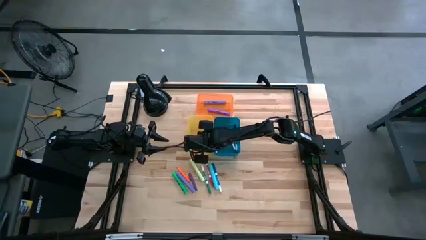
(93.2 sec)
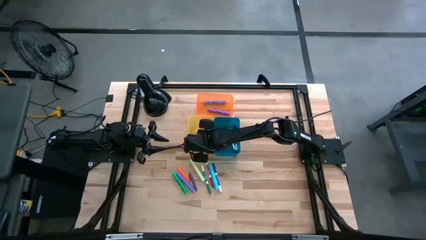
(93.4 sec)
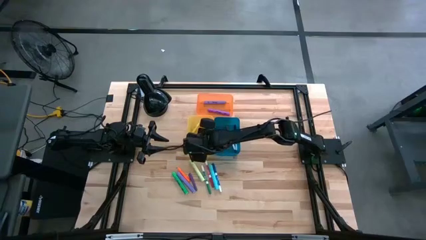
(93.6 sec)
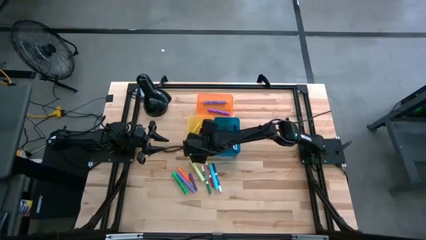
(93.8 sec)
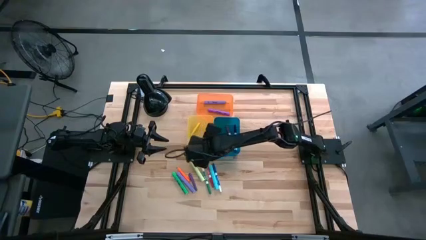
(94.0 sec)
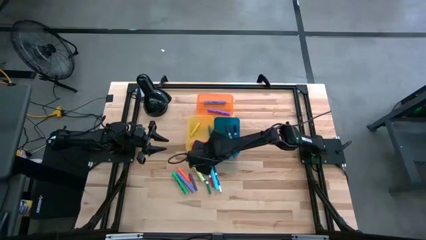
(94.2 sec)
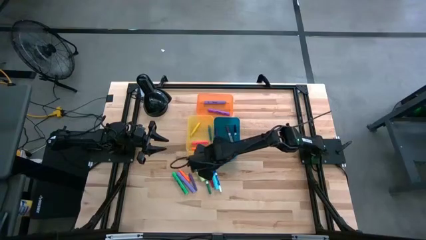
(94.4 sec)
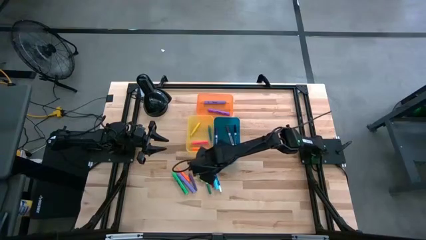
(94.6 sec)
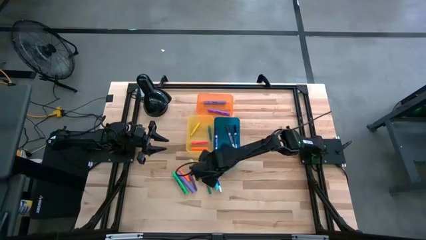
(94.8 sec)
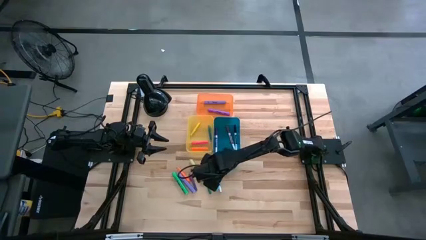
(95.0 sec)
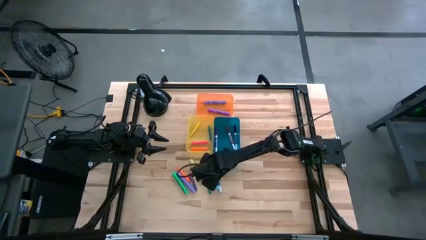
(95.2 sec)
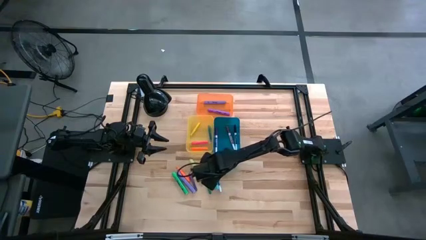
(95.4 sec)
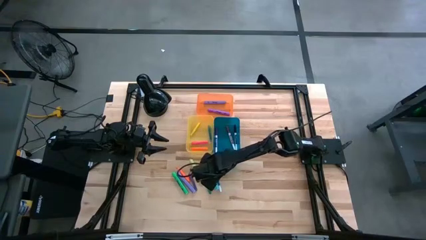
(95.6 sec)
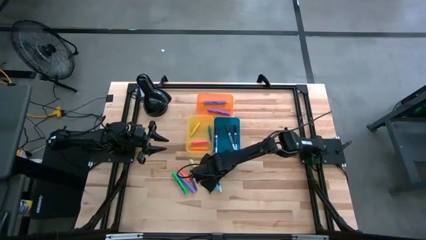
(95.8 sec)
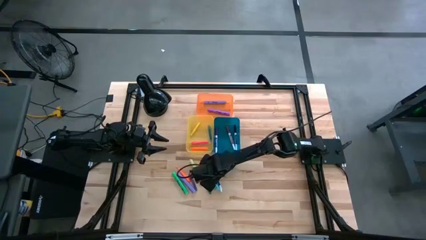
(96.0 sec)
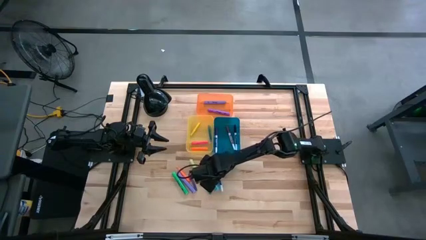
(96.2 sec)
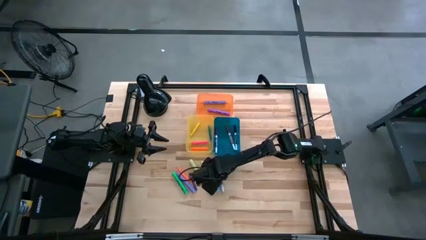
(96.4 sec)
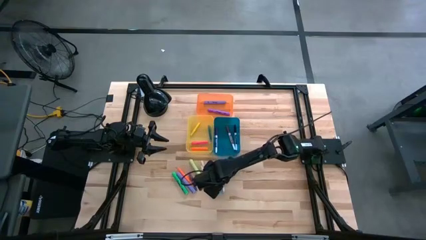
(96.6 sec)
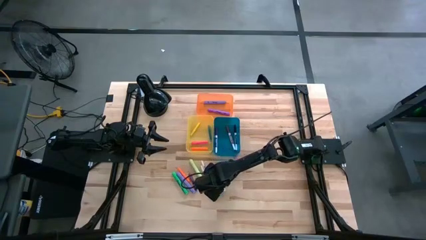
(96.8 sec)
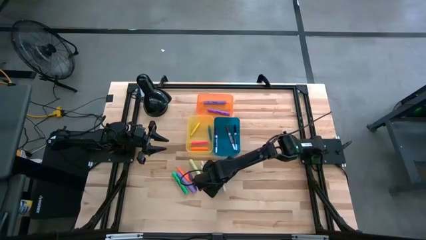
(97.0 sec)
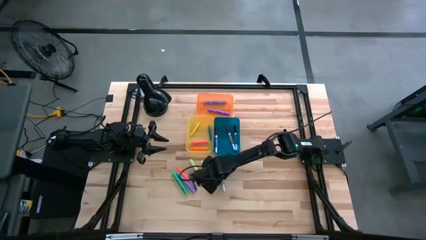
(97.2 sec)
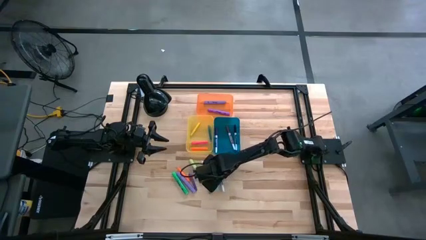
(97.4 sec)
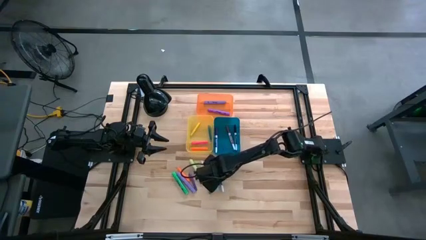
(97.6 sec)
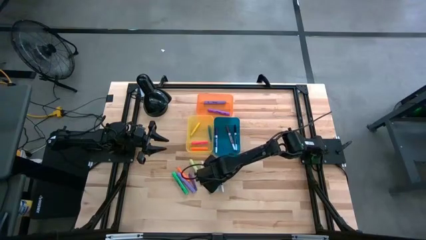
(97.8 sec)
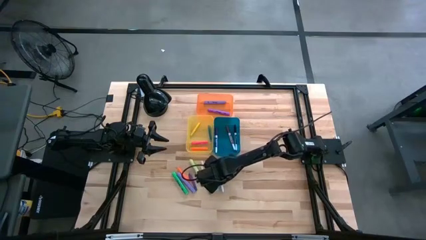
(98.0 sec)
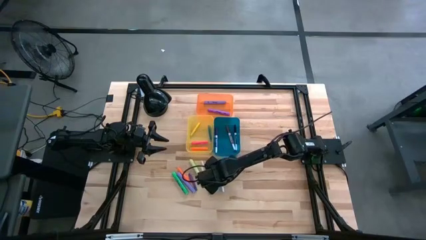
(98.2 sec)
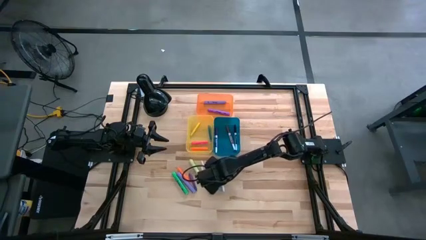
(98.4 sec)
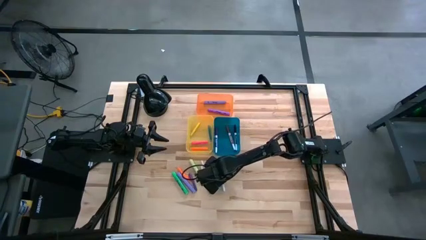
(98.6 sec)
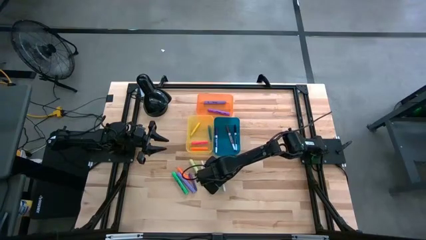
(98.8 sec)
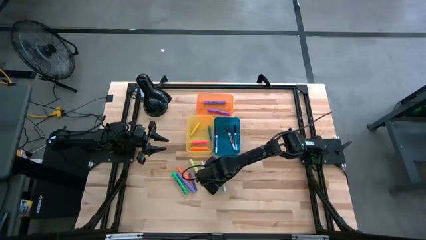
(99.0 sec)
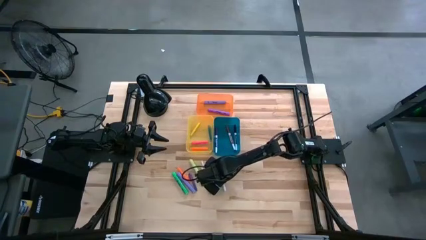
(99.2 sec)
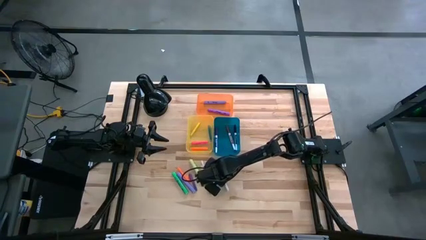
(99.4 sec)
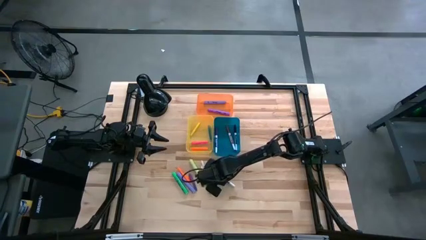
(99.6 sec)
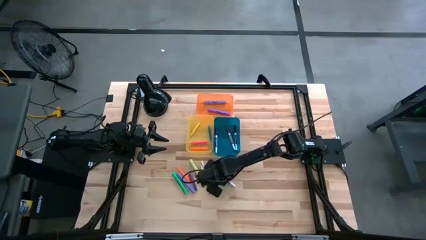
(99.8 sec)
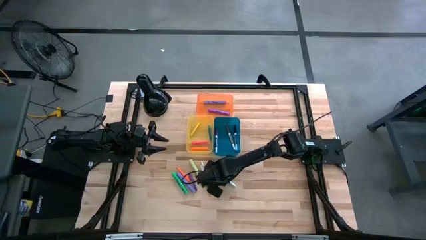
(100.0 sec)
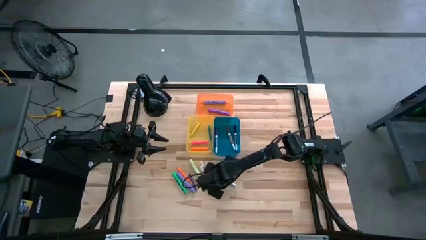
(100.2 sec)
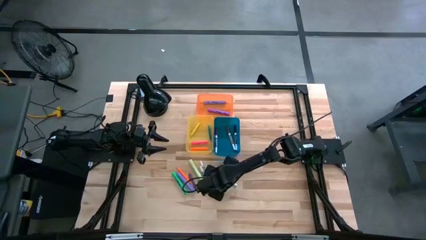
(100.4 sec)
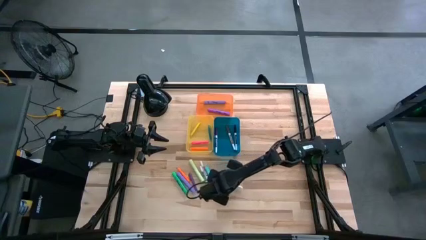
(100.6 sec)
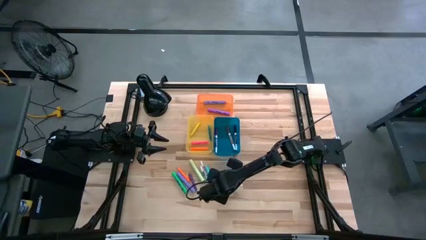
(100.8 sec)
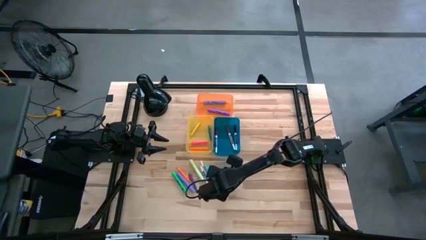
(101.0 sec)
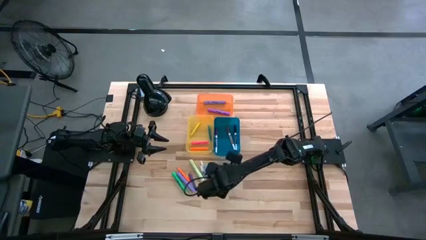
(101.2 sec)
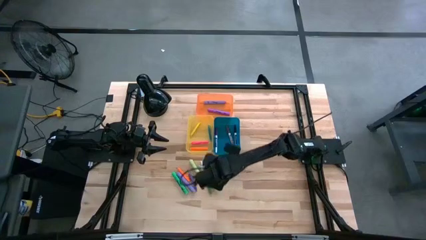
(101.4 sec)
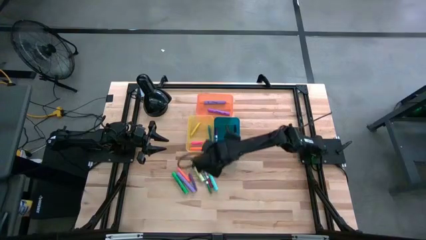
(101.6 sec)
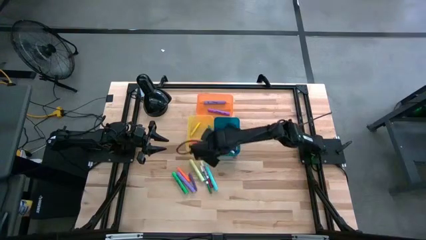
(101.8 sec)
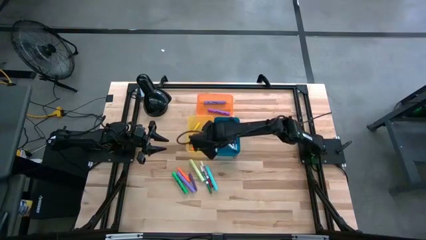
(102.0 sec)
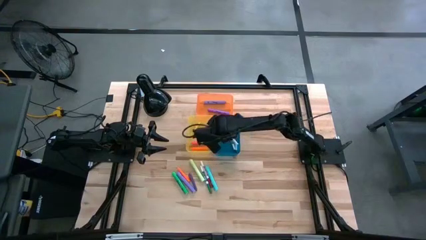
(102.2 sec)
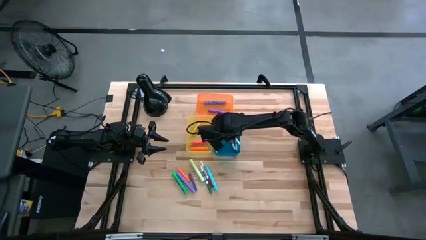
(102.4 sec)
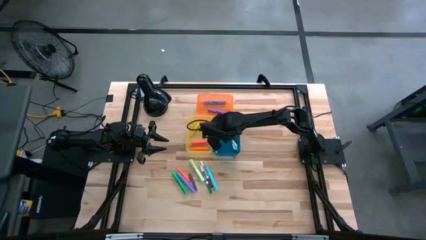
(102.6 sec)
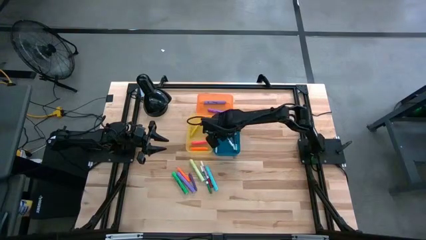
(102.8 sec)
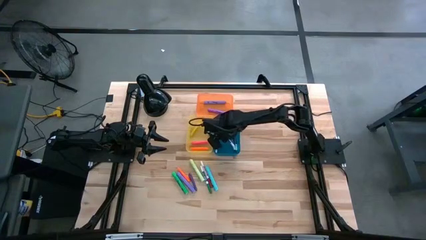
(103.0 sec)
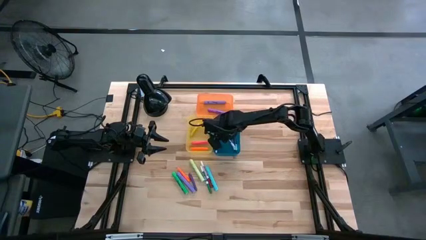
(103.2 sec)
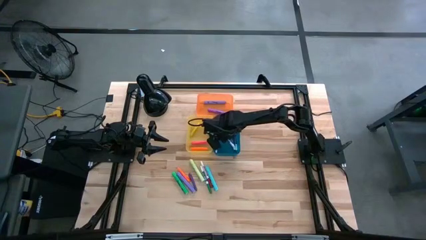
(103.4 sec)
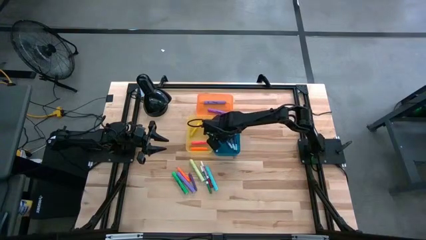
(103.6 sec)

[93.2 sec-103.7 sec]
Task: Pick & Place Markers
Put the blue marker pen into the blue bin

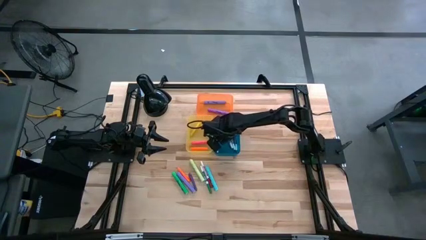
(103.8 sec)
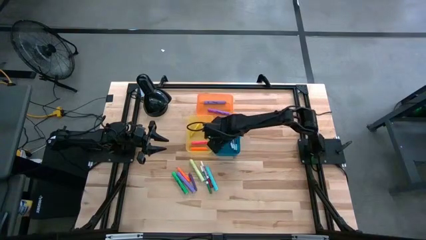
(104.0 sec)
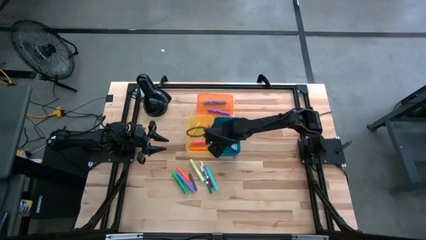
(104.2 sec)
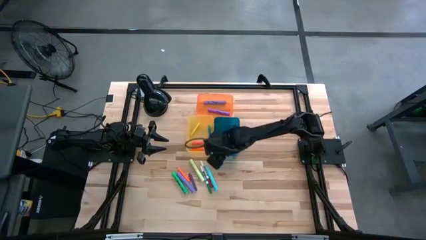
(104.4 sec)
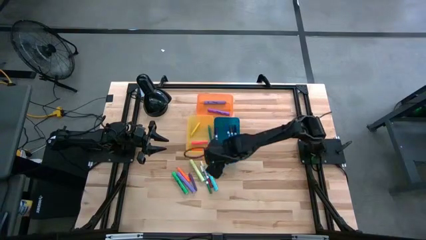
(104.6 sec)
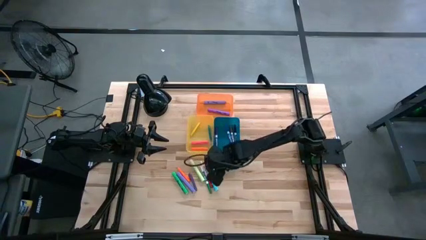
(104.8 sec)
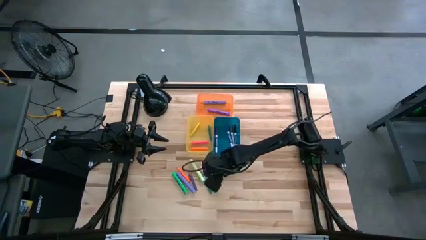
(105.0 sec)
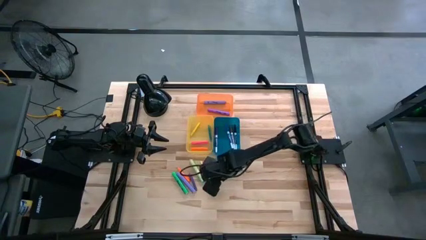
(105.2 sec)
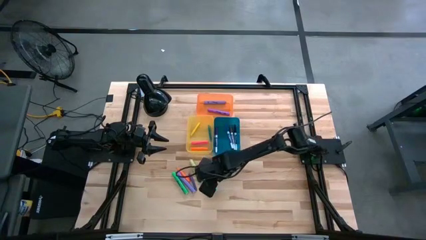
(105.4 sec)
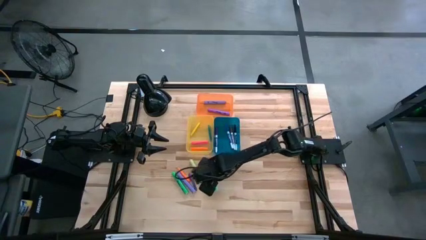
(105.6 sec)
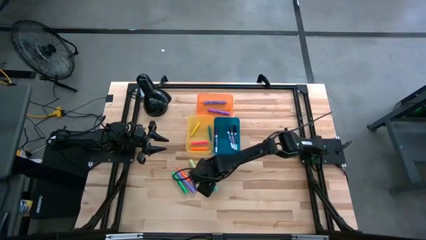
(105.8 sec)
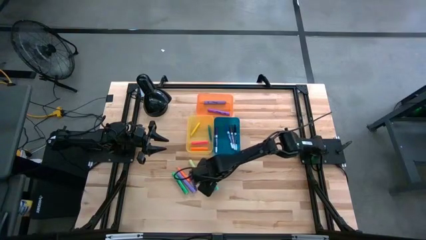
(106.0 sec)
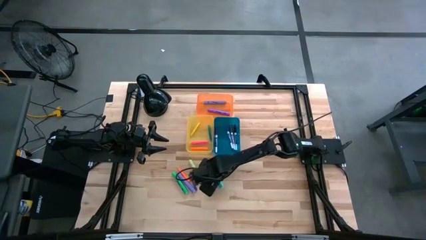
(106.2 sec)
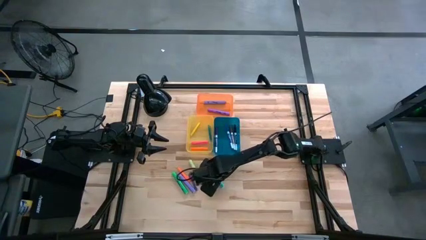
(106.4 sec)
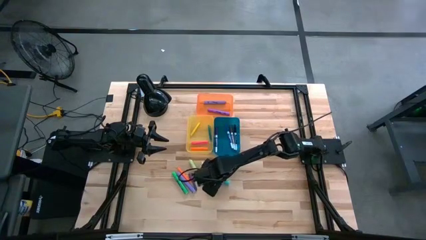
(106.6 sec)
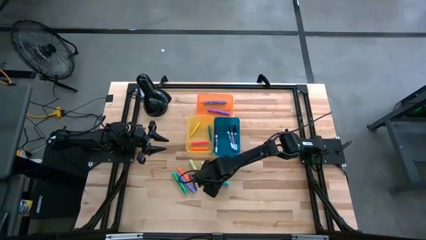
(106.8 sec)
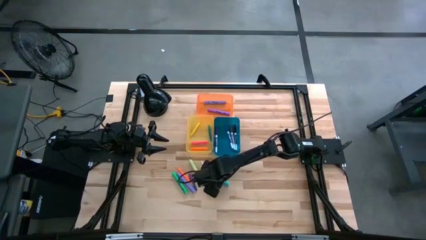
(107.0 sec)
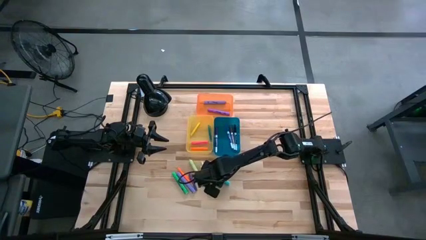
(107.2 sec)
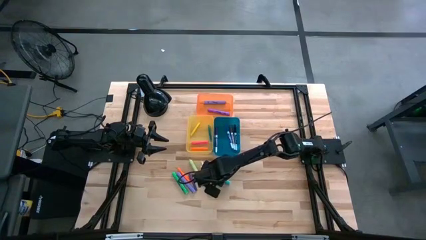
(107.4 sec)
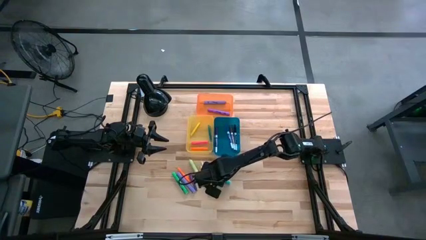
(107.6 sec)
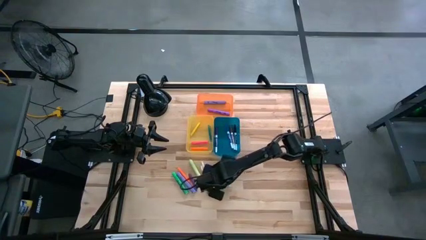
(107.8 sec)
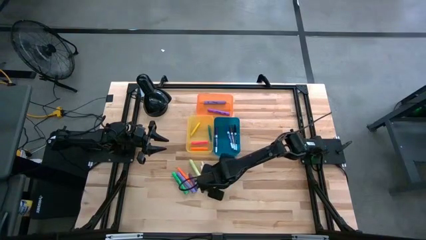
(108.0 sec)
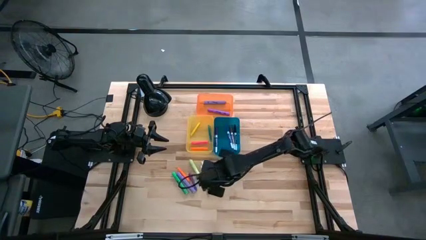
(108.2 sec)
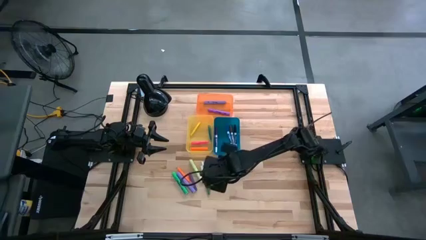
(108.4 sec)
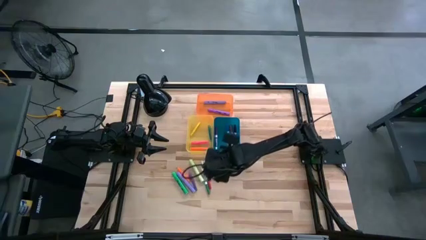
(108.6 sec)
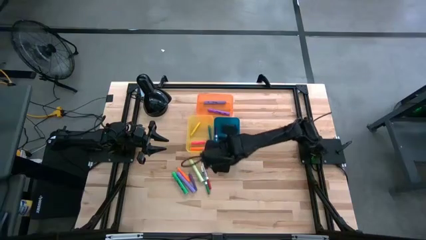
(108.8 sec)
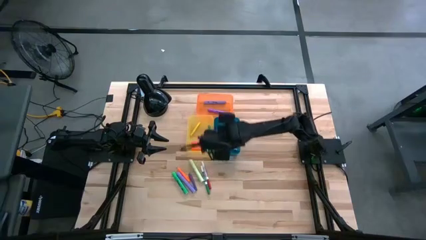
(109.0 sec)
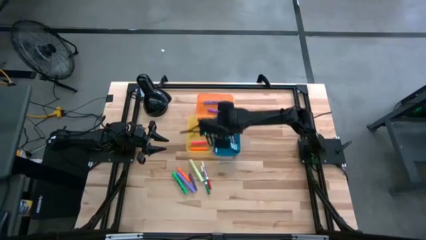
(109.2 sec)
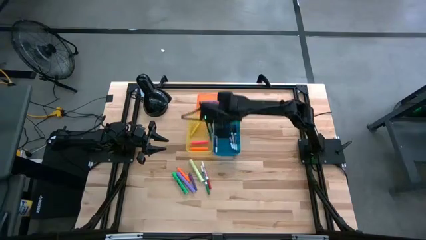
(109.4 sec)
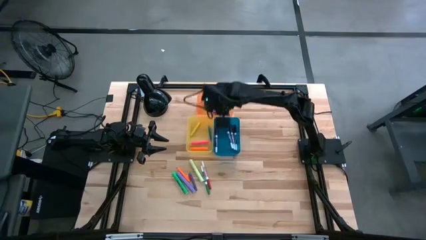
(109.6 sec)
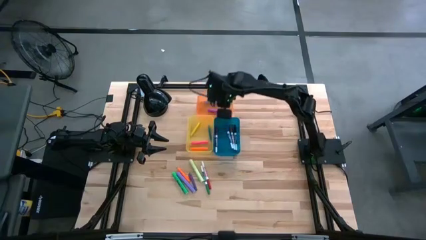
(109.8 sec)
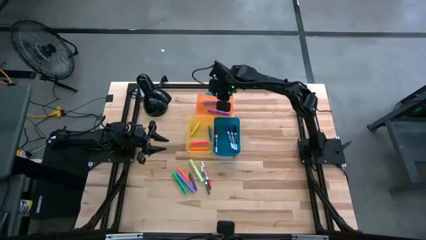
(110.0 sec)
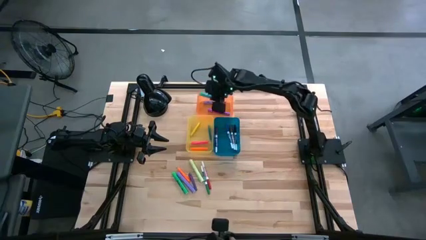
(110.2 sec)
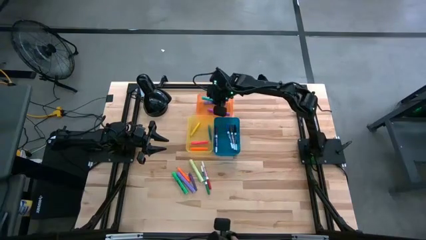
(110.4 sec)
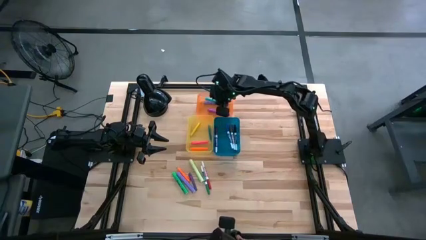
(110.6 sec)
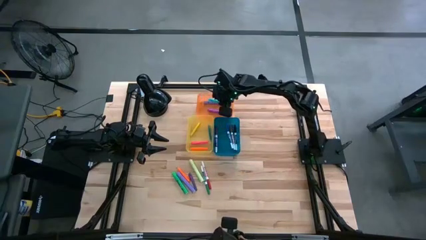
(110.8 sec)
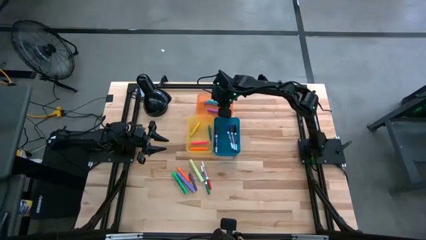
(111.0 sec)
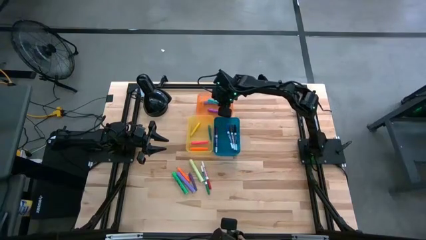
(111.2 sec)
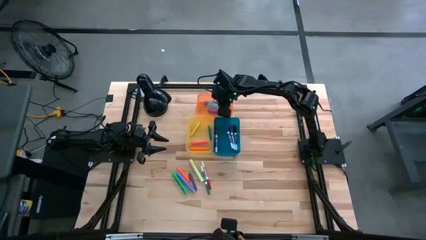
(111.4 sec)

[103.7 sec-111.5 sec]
Put the light blue highlighter pen into the orange bin
